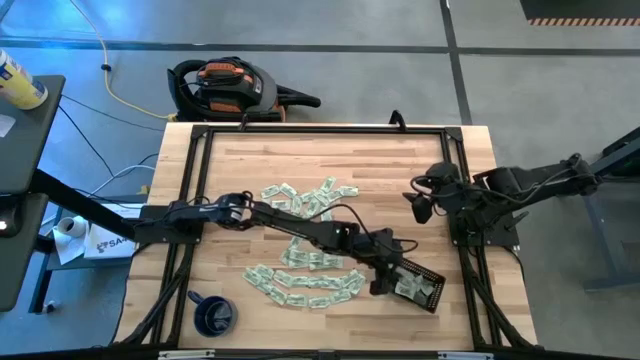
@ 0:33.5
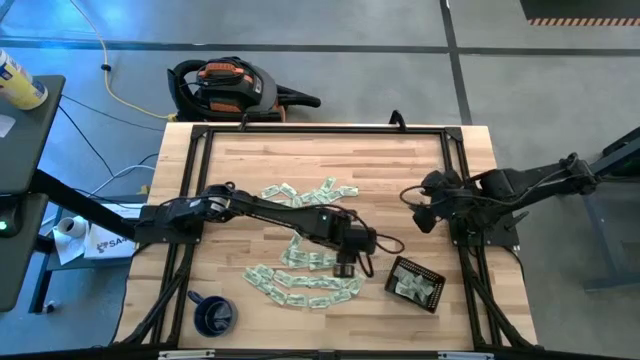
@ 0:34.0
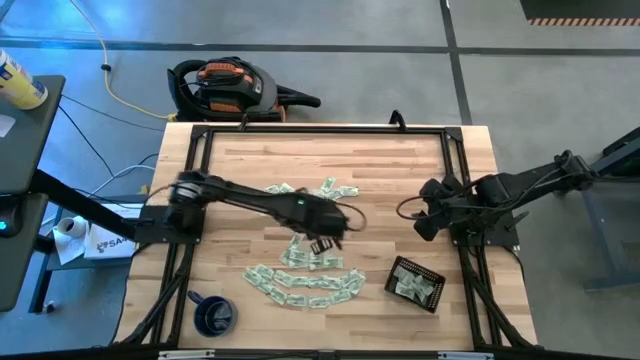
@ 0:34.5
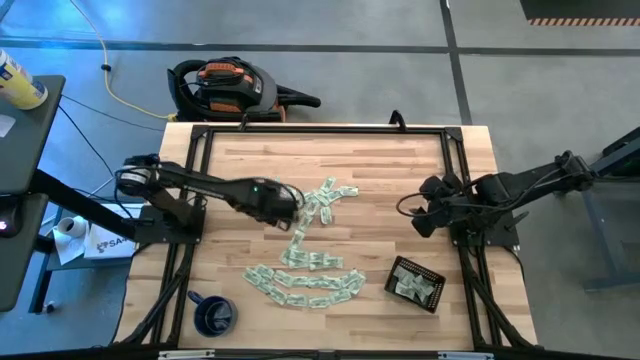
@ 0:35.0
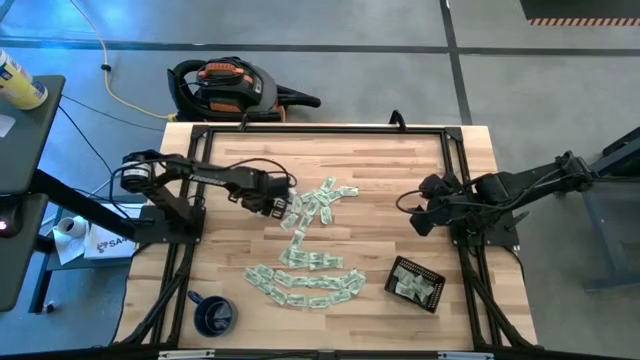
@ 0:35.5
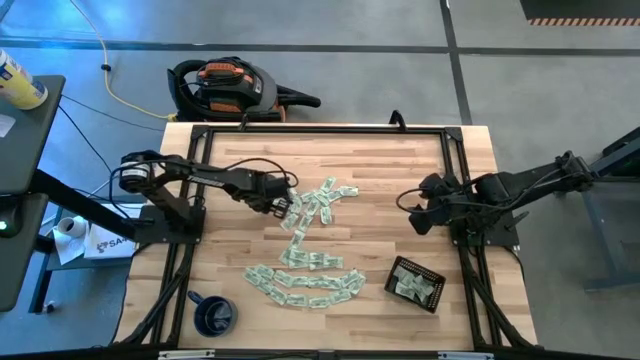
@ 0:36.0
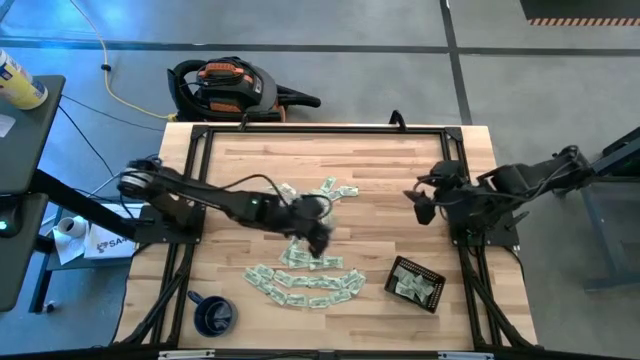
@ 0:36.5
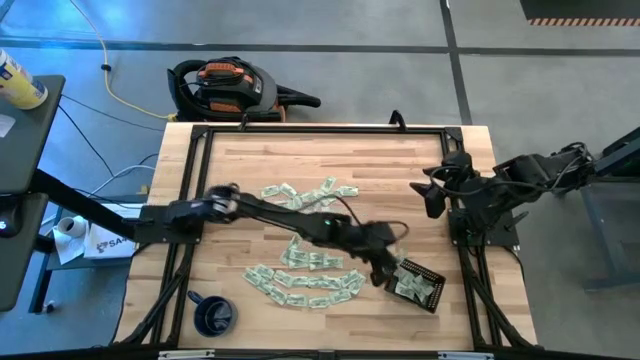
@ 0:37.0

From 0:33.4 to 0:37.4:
Task: Pick and place Stevia / Truvia into bins
Put the stevia packet into the black bin

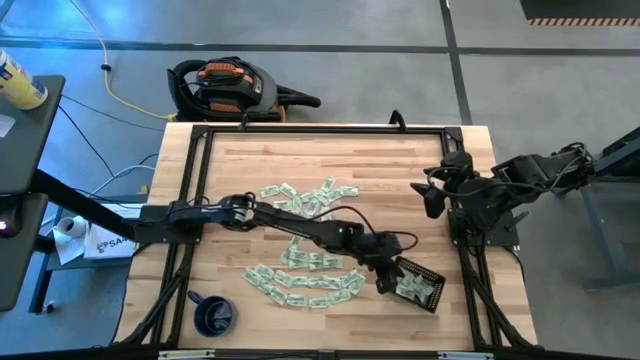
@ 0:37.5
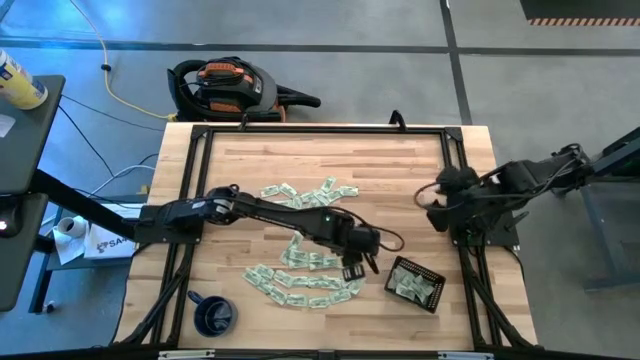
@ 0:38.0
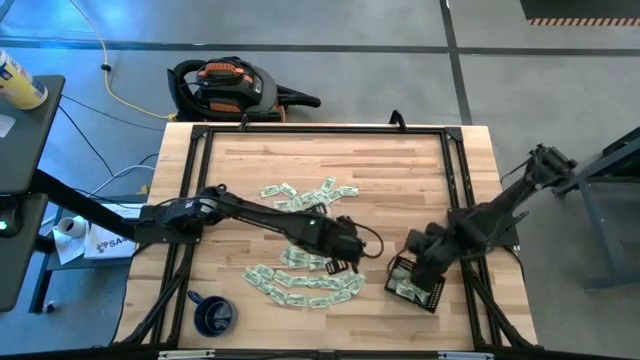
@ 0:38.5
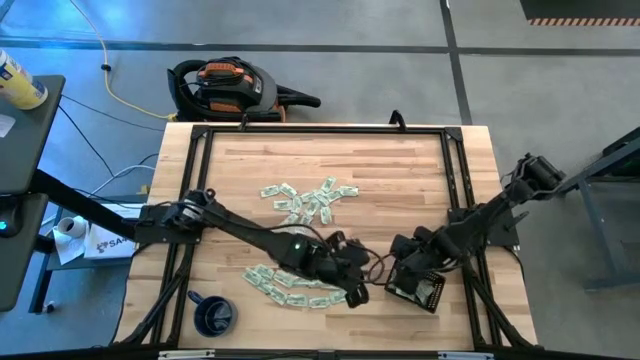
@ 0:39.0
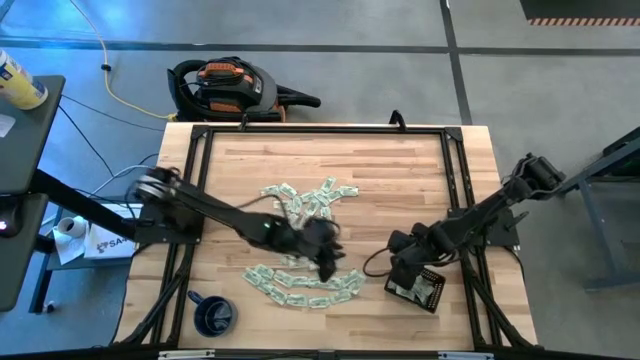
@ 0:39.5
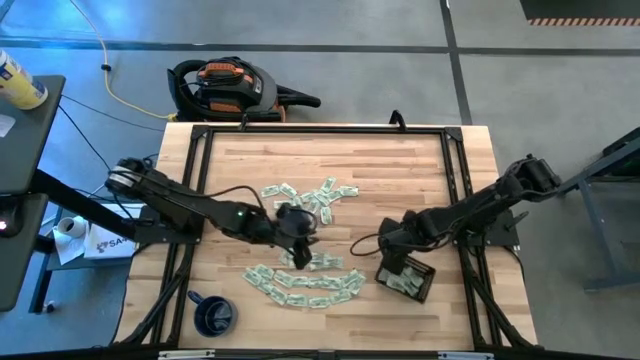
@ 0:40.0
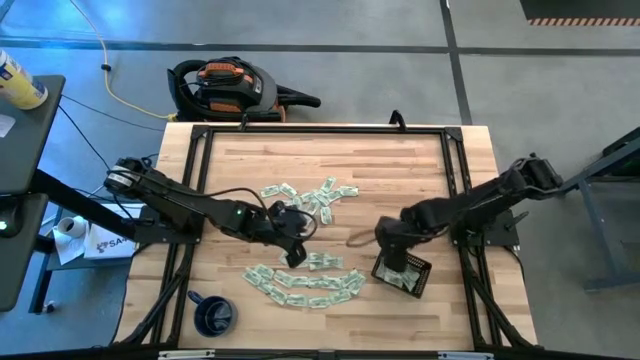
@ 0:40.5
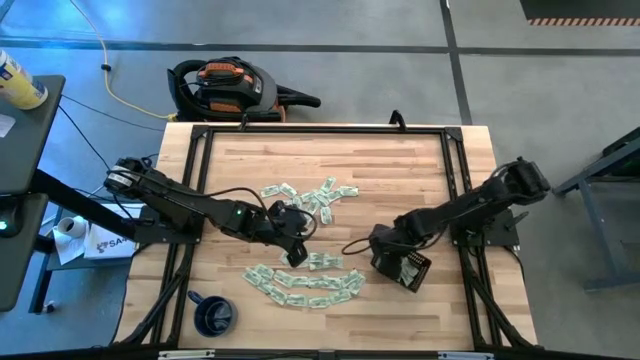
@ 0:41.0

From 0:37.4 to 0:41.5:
Adjust the black bin

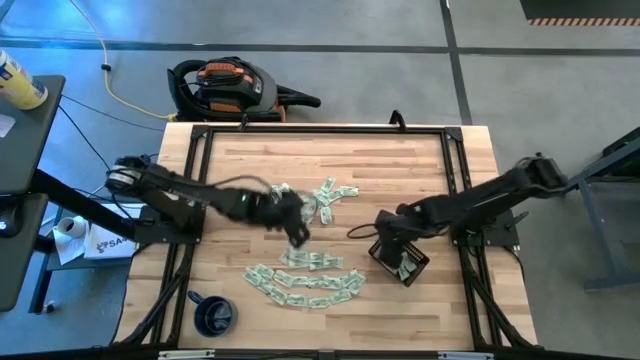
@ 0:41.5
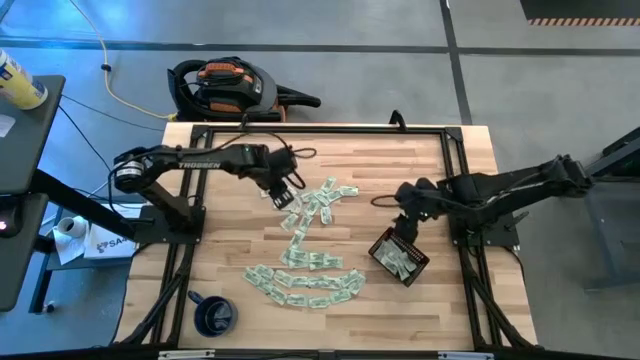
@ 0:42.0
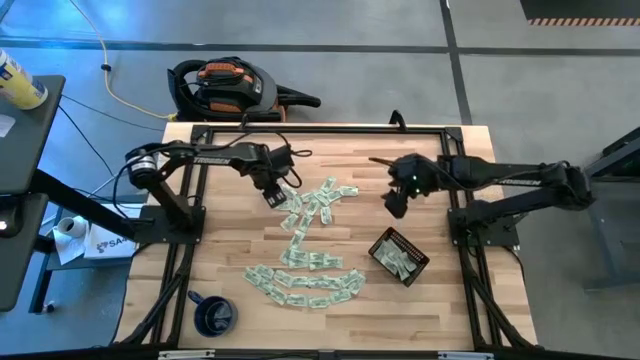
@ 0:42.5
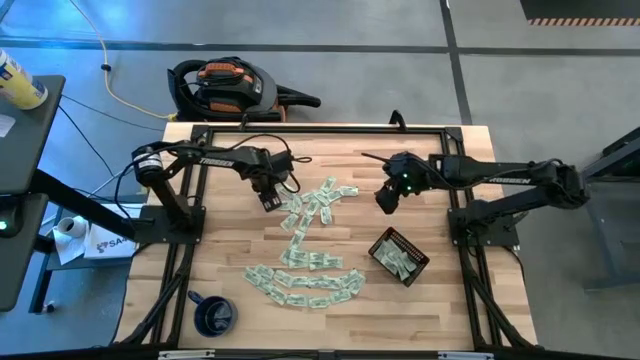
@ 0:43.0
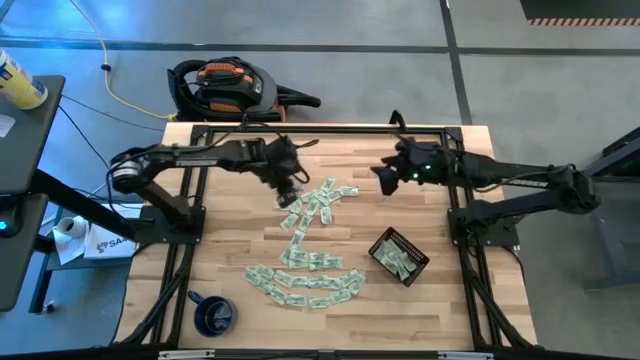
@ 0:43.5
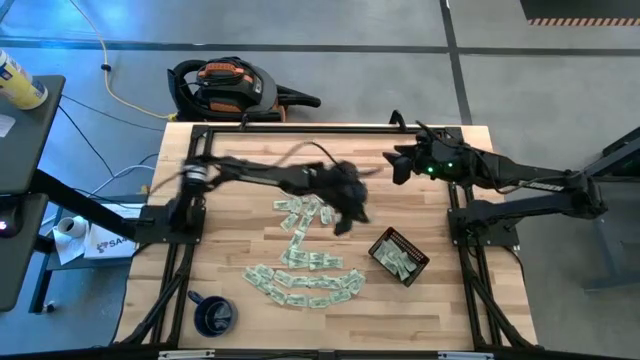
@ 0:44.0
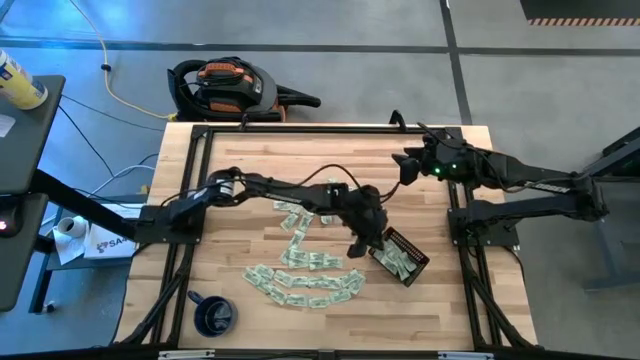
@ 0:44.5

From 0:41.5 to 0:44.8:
Put the stevia packet into the black bin

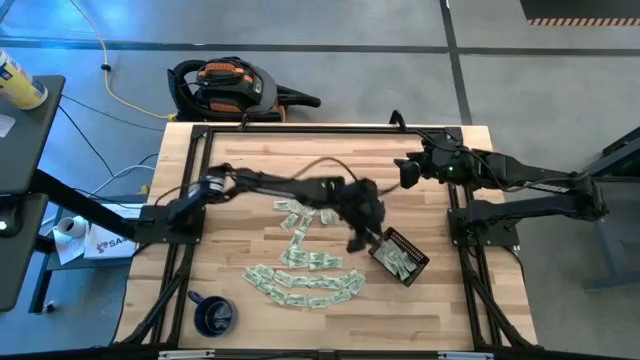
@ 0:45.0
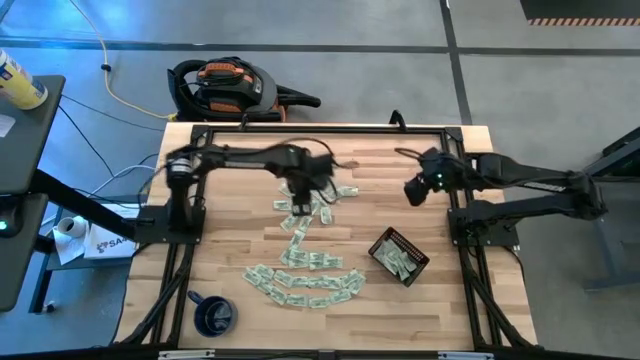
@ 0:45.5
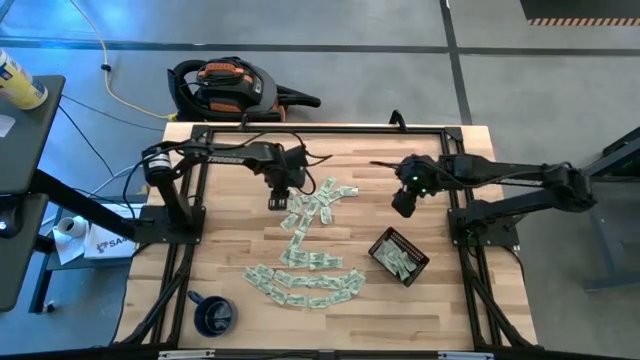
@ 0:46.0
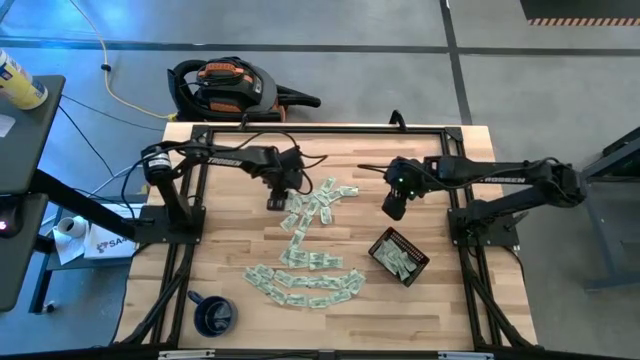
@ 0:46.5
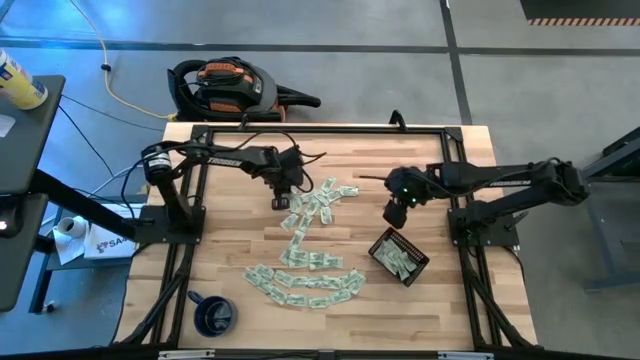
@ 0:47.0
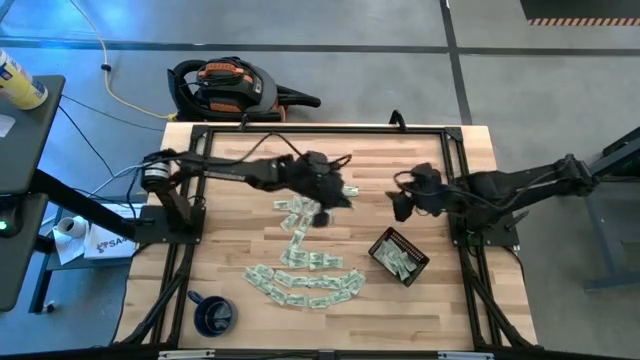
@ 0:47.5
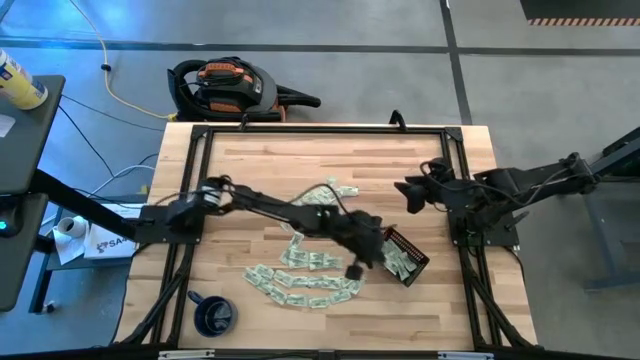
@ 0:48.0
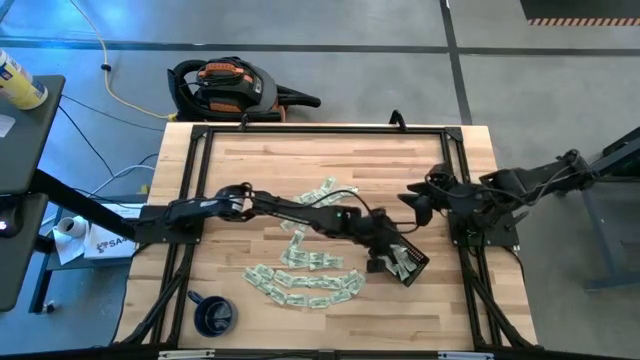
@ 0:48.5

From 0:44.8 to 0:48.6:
Put the stevia packet into the black bin

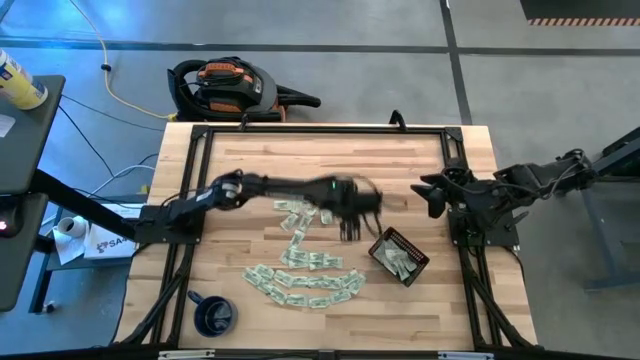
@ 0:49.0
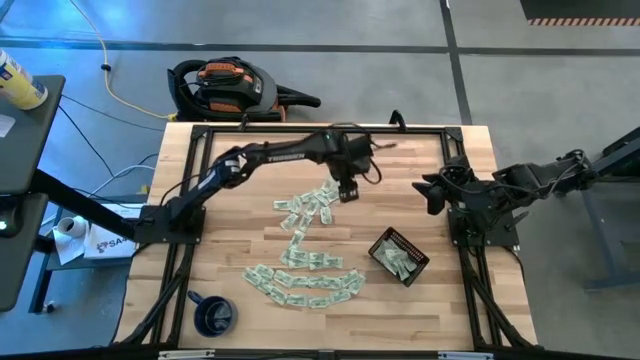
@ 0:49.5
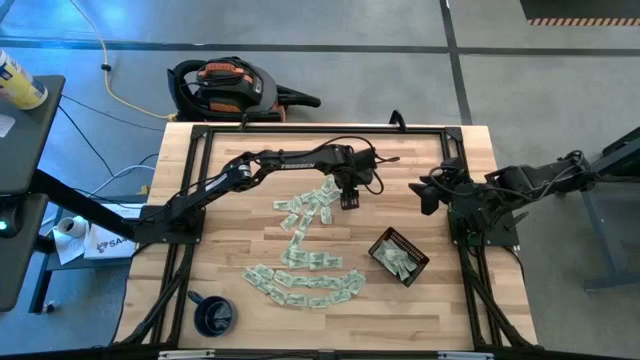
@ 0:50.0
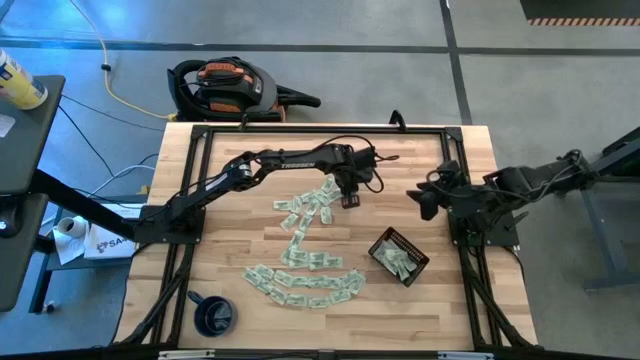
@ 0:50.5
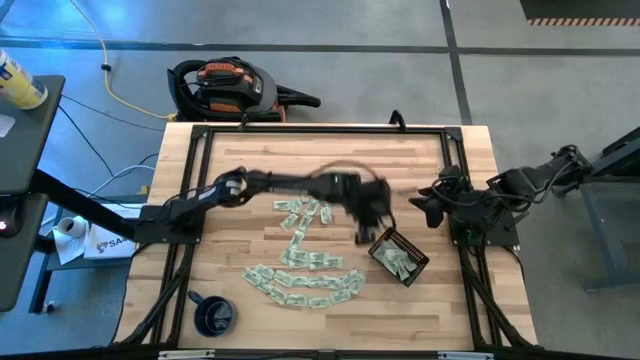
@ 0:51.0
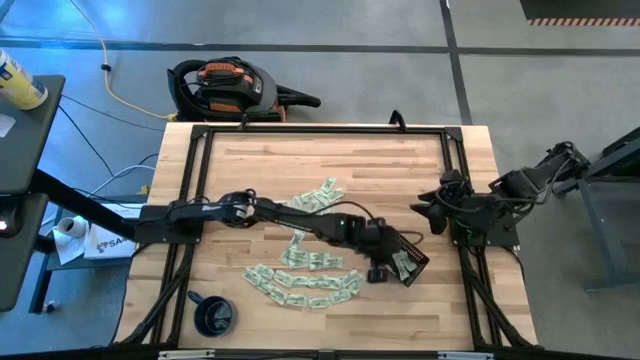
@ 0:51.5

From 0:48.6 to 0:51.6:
Put the stevia packet into the black bin

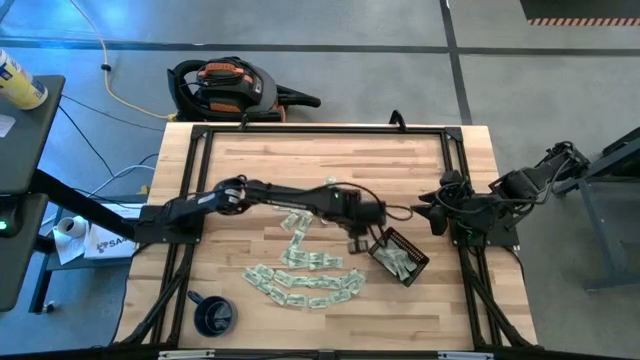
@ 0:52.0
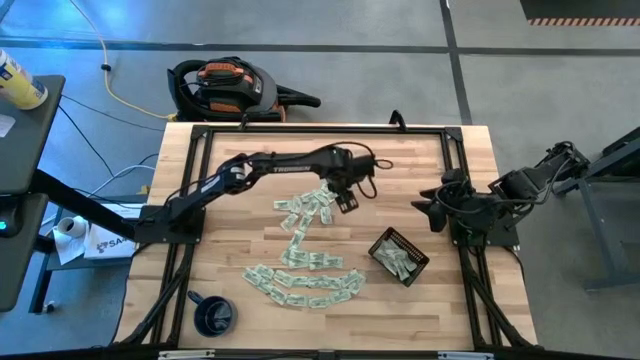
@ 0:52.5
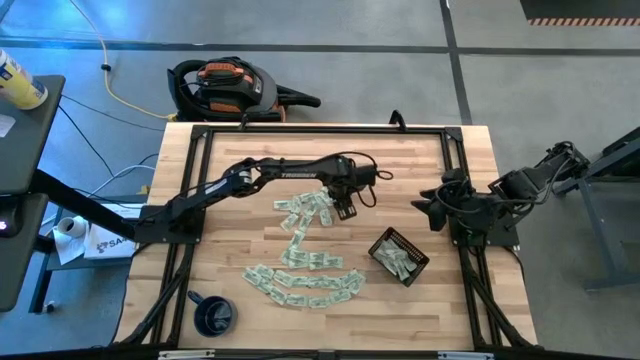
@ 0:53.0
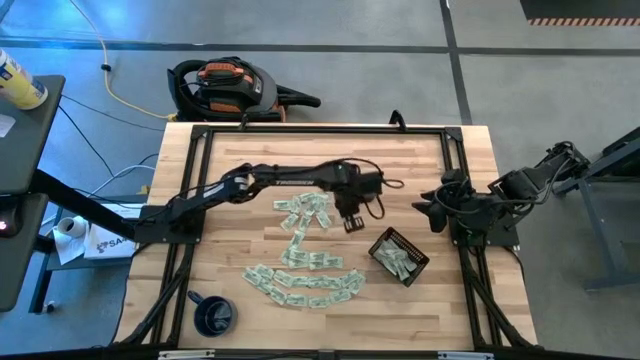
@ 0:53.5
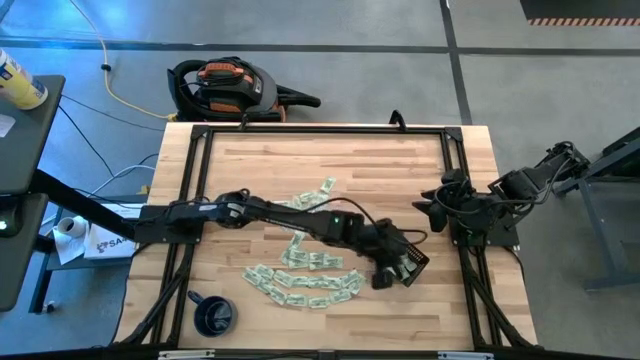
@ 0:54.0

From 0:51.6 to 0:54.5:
Put the stevia packet into the black bin

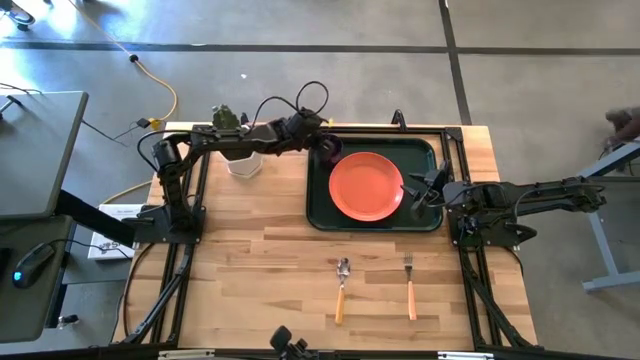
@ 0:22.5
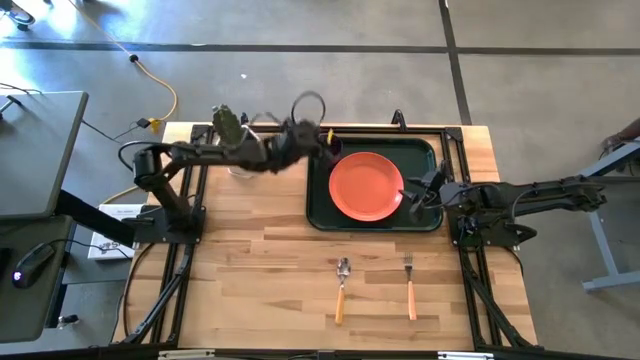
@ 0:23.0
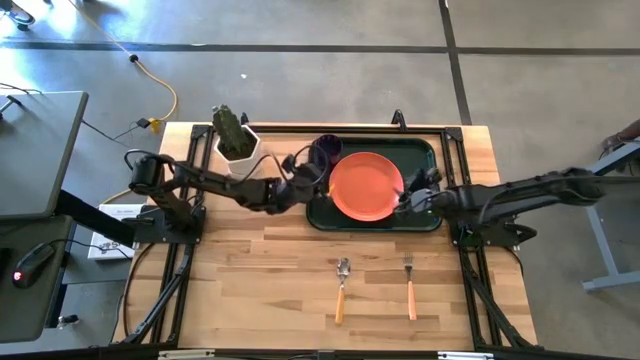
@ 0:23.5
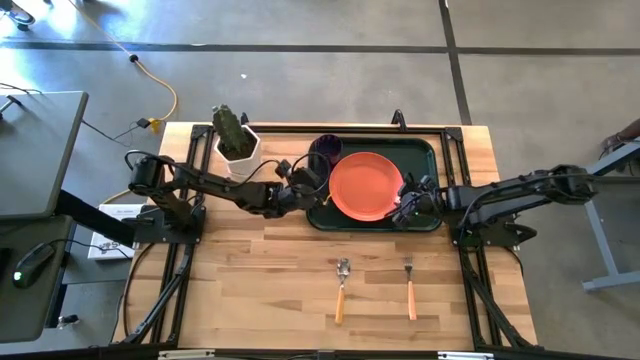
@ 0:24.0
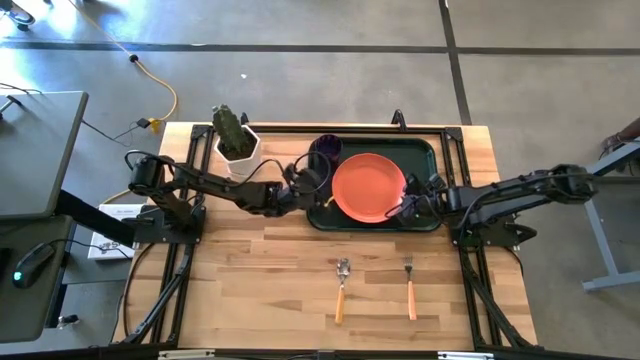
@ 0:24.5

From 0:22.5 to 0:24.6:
Task: Pick and place plate/cup/fork/spoon on tray
Adjust the orange plate on the black tray
